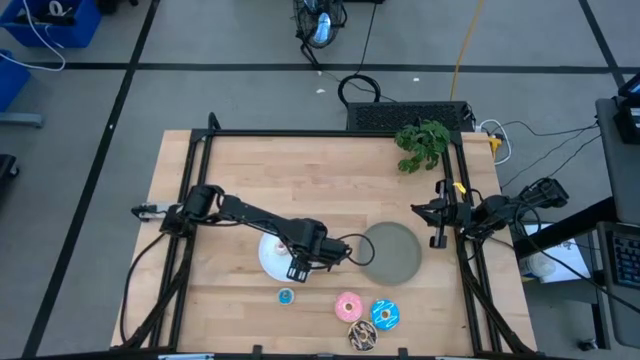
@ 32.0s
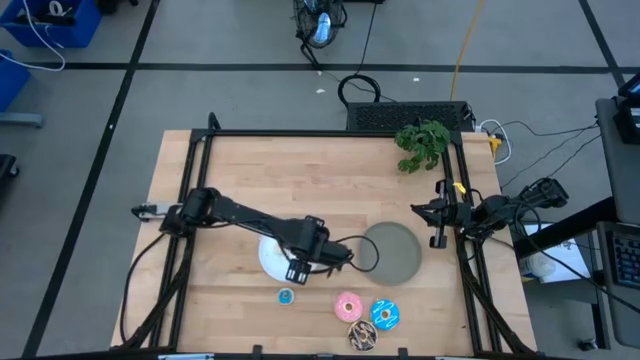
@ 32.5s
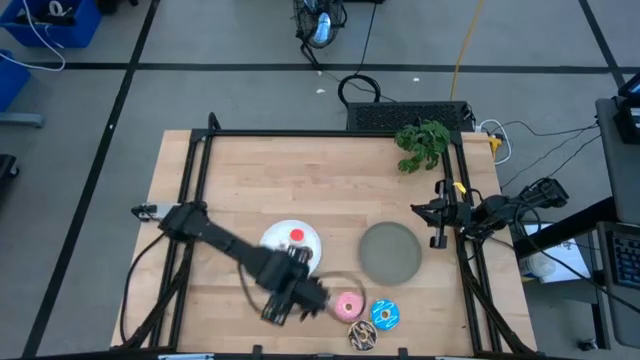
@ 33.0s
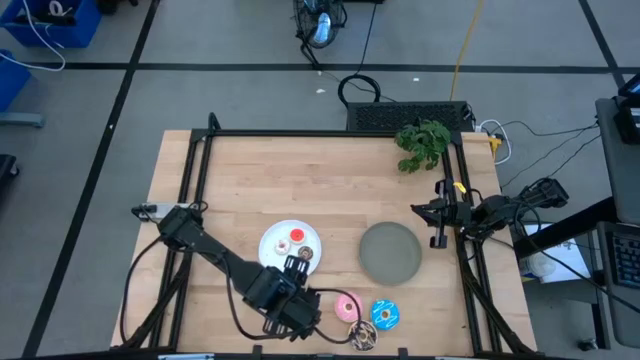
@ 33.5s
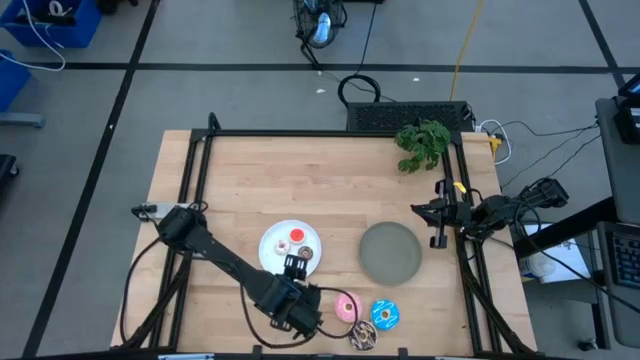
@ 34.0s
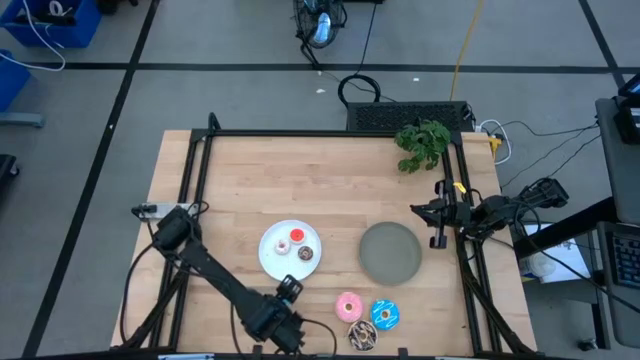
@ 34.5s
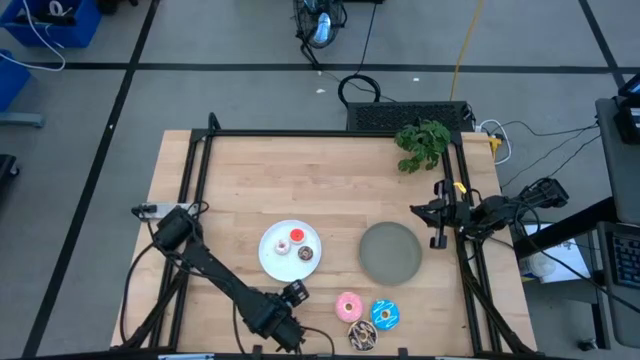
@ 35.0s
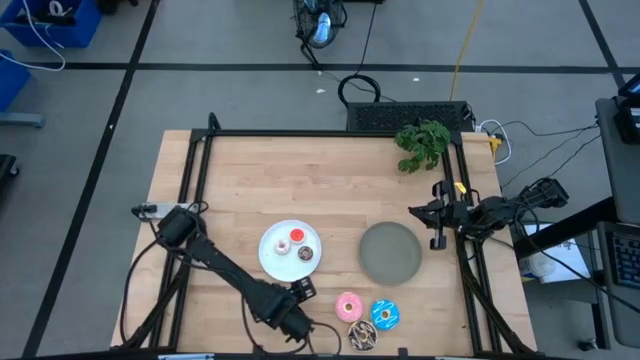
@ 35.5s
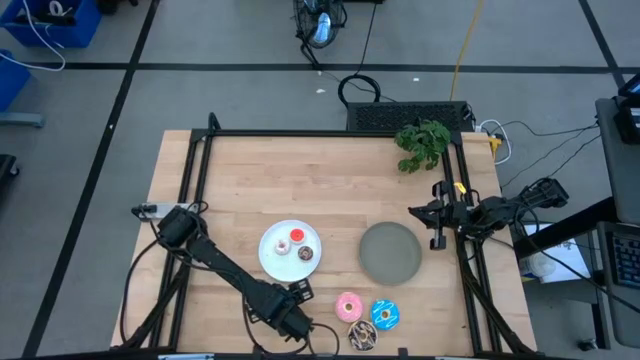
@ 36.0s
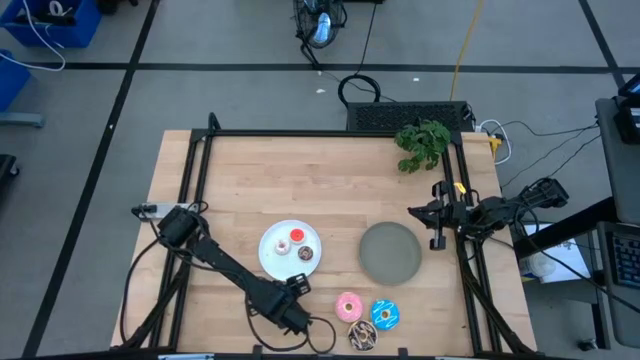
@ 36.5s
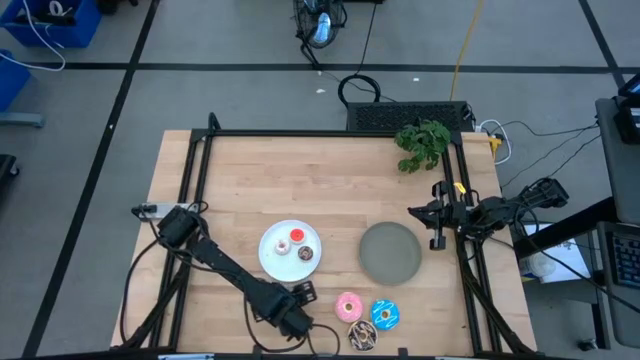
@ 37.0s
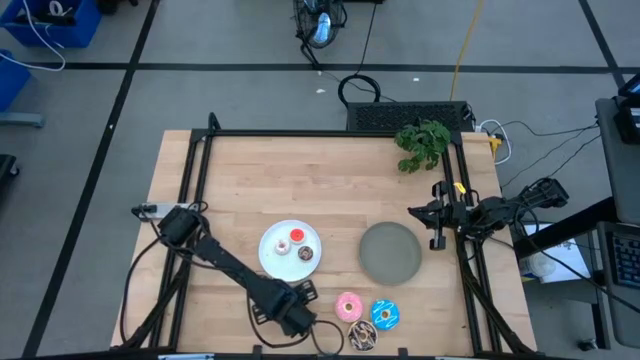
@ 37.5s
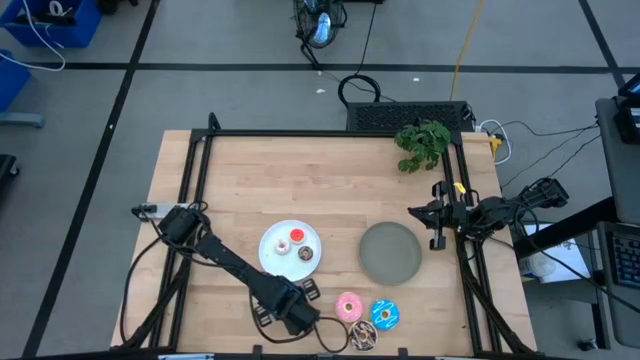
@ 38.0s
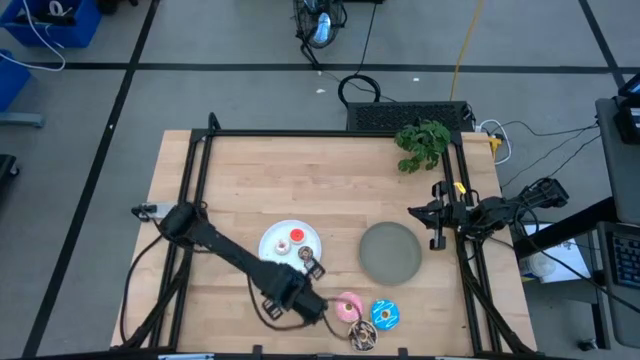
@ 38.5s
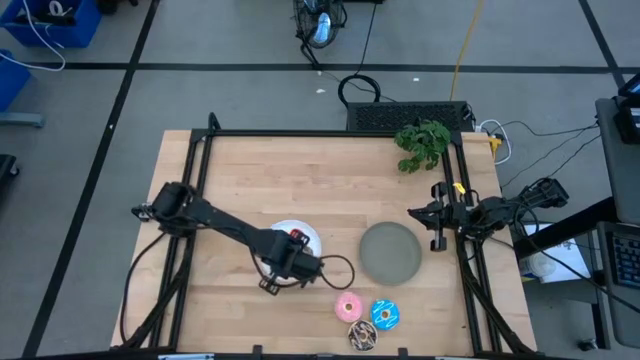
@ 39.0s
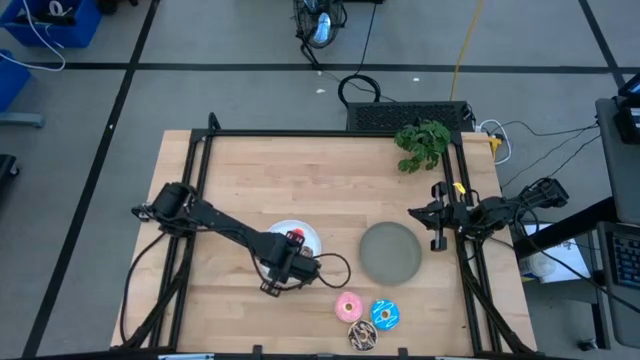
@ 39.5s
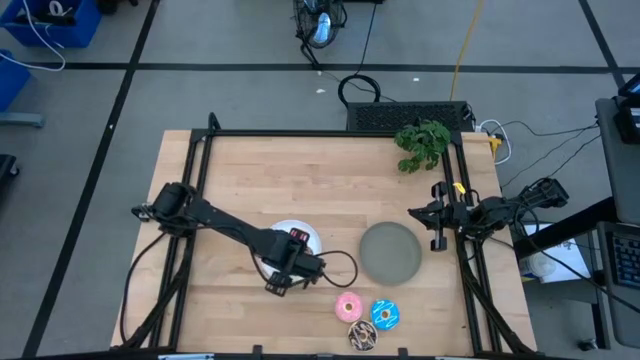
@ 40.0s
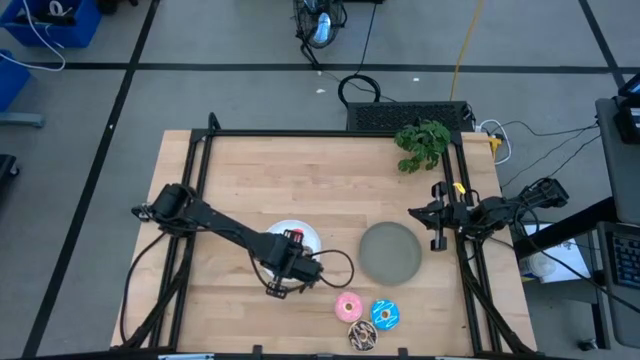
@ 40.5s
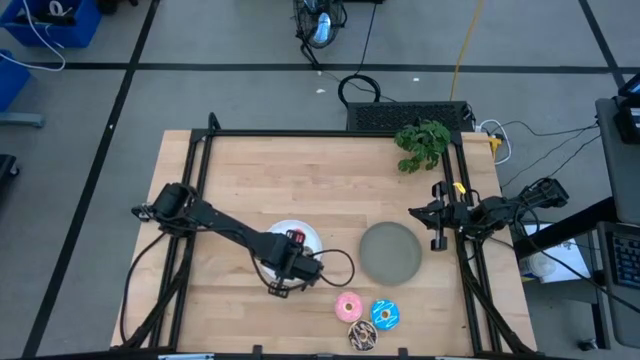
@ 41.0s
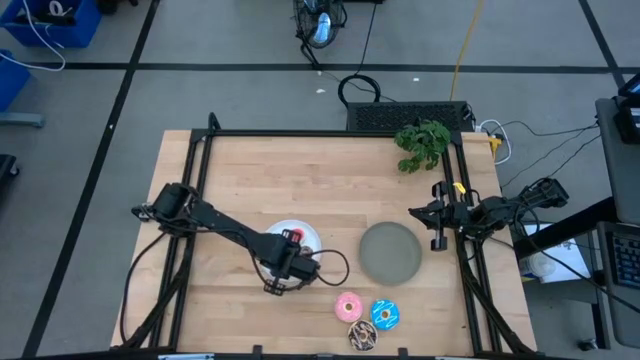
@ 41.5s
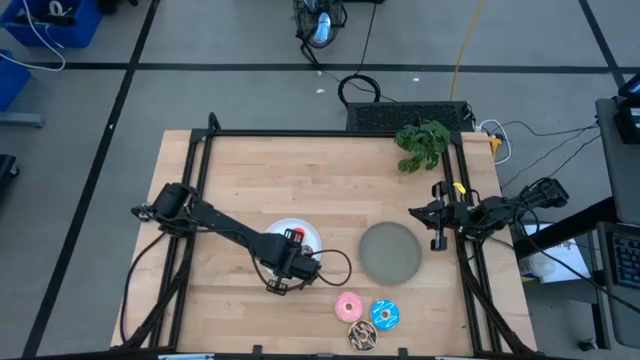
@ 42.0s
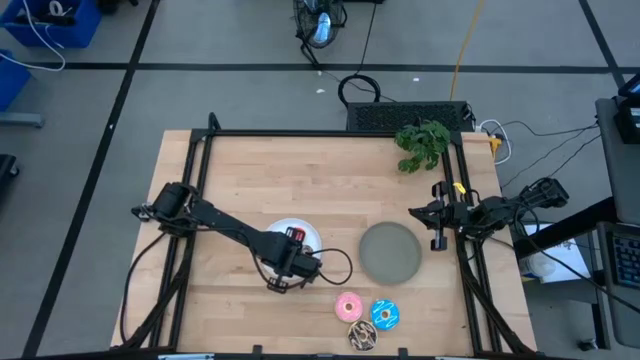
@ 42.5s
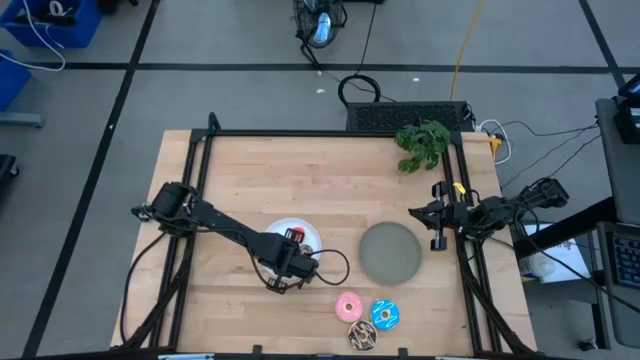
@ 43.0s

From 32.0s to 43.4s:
Task: Pick & Place donuts
Put the small blue doughnut on the white plate

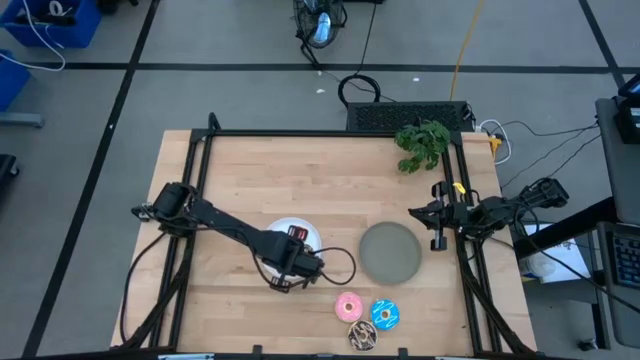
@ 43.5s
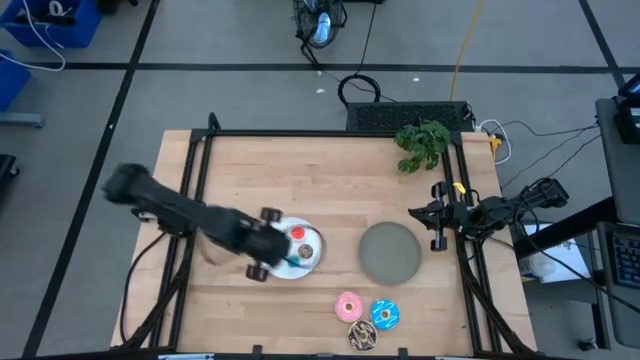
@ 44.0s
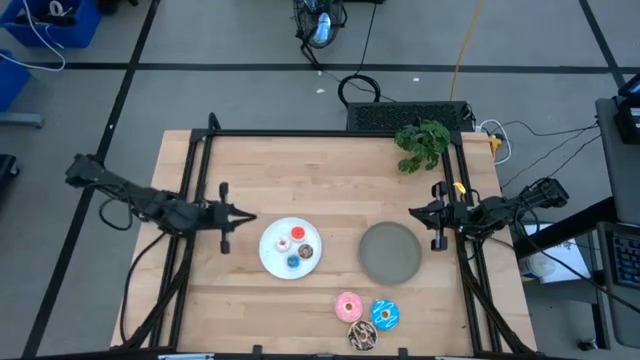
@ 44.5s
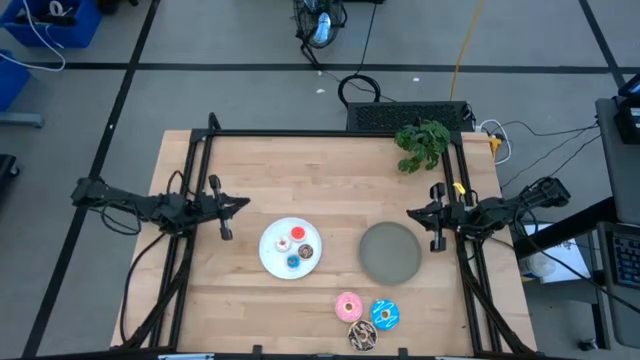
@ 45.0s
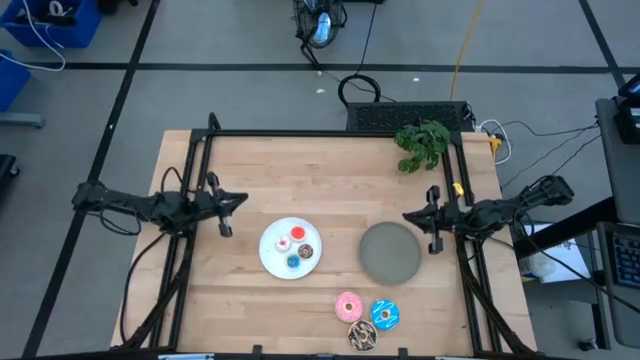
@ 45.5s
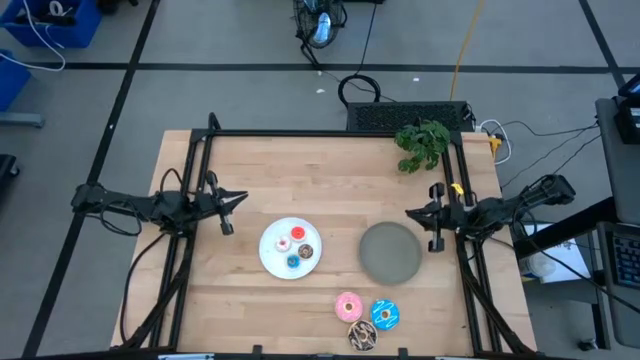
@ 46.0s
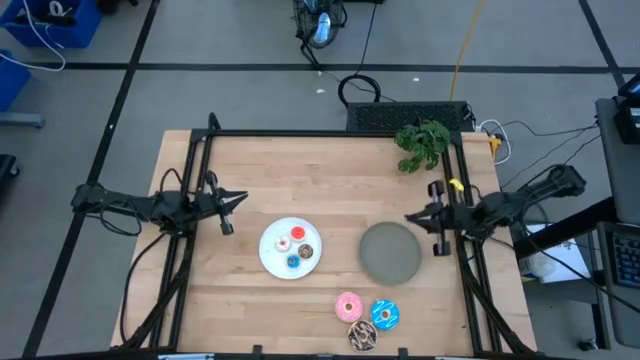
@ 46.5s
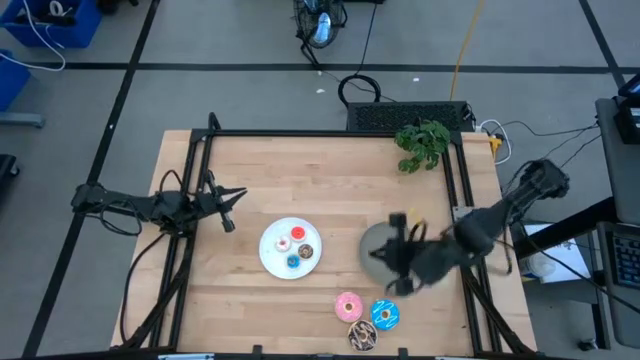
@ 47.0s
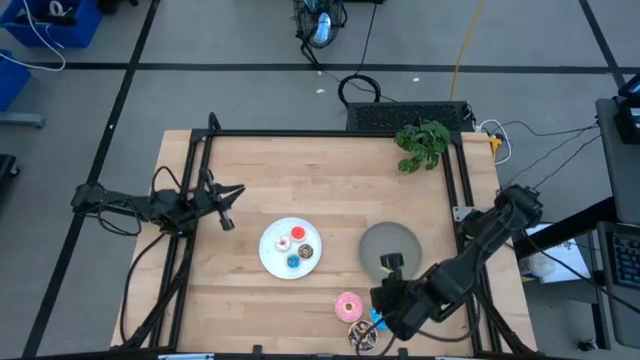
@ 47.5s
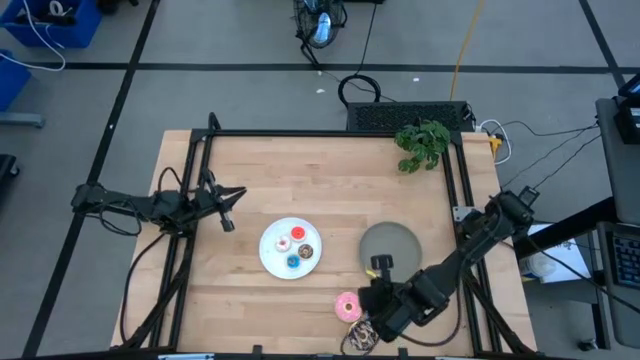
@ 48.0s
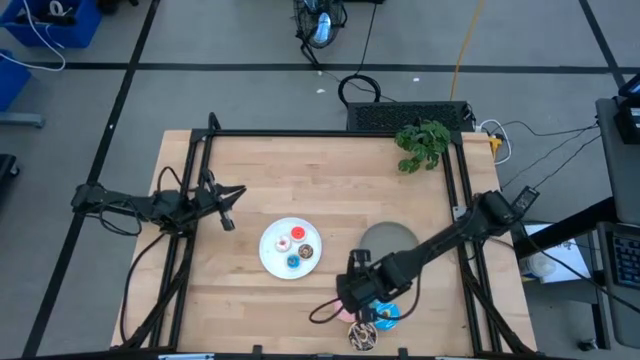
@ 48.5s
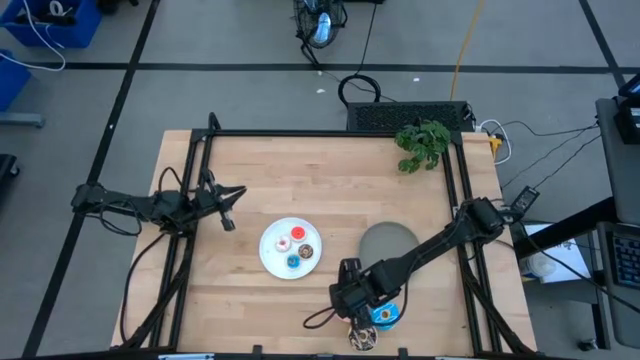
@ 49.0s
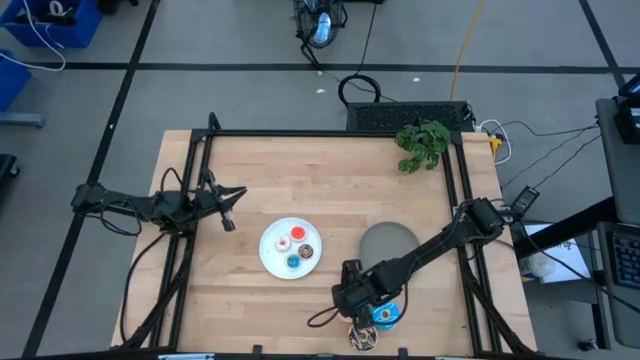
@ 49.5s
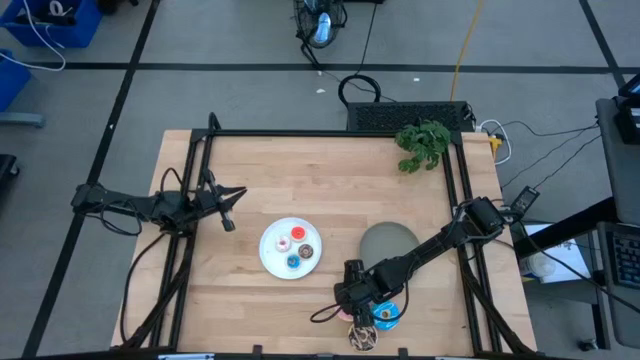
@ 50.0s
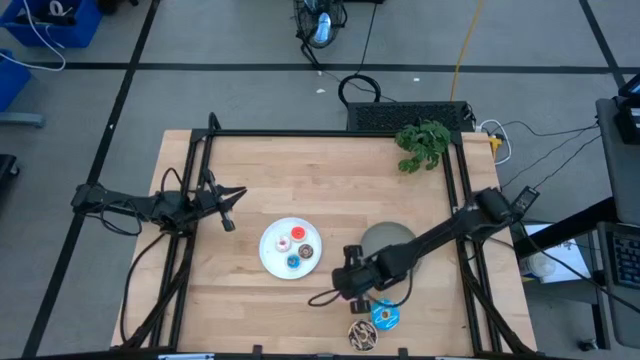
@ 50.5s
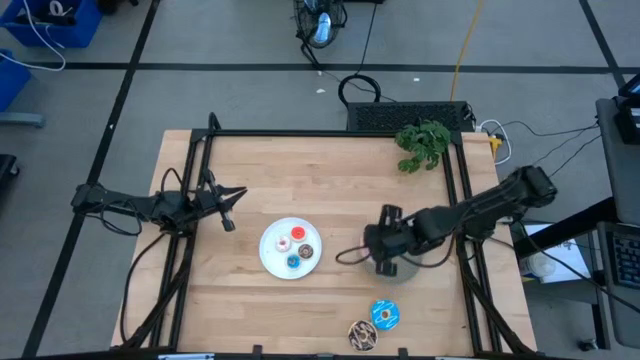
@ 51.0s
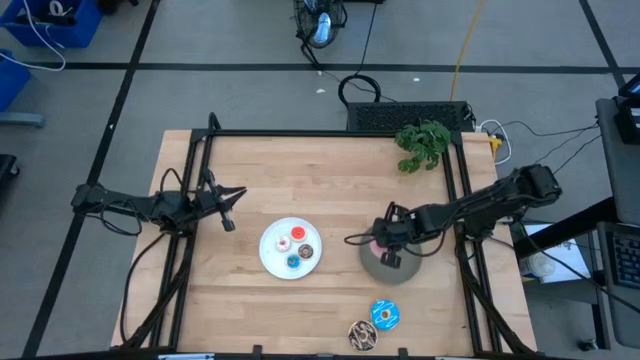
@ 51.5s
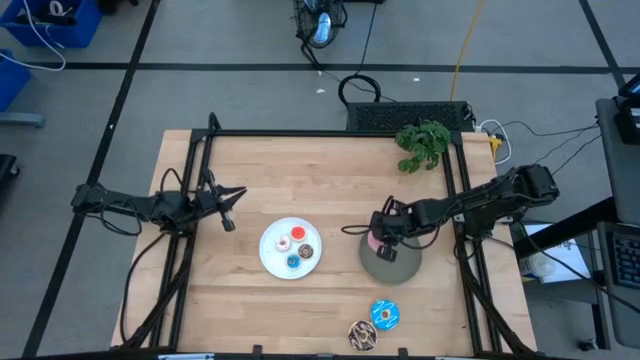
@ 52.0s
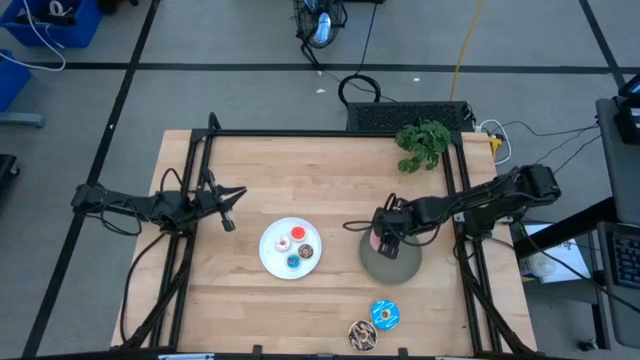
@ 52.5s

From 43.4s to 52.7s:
Put the large pink doughnut on the gray plate
